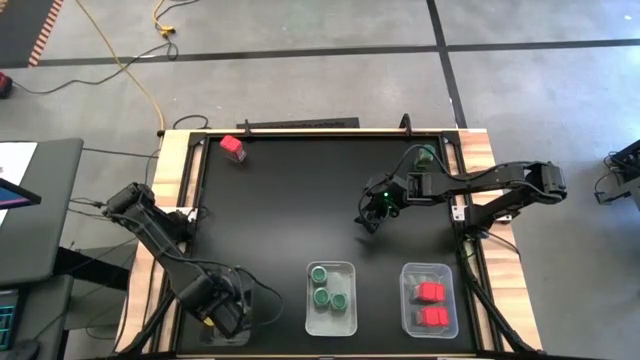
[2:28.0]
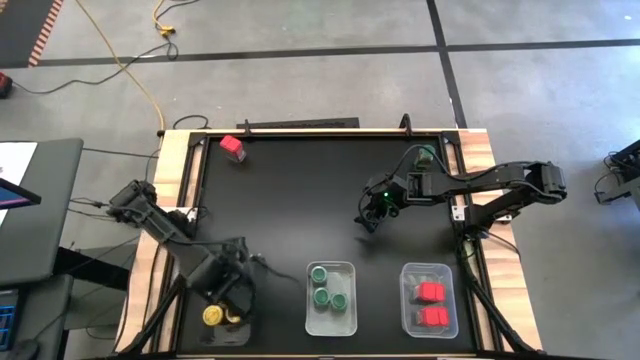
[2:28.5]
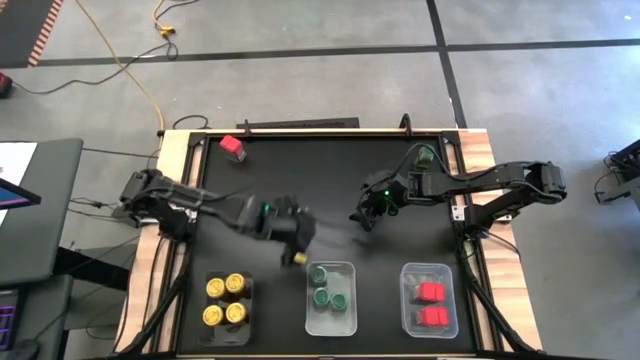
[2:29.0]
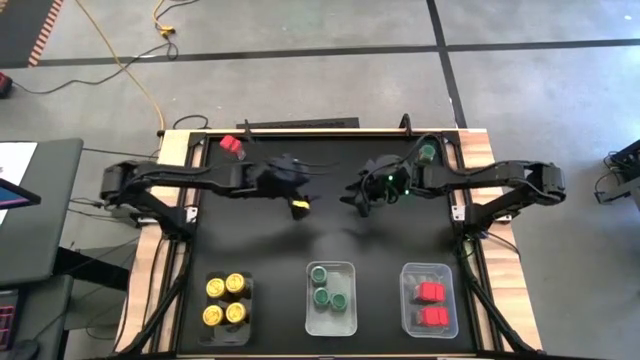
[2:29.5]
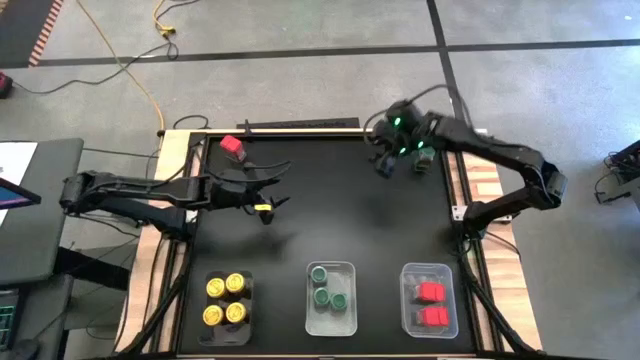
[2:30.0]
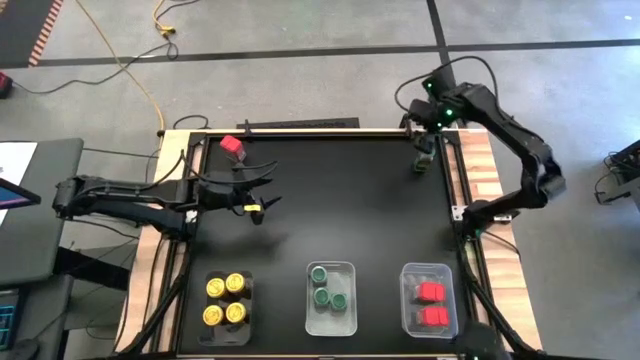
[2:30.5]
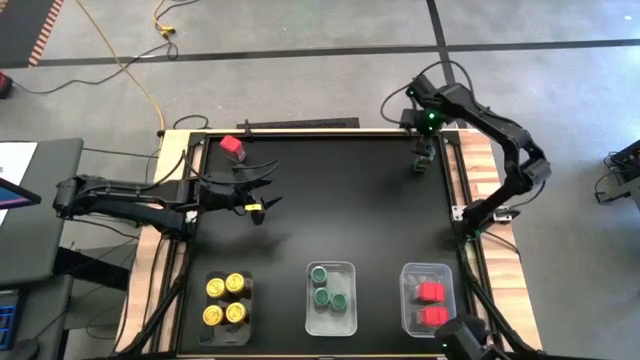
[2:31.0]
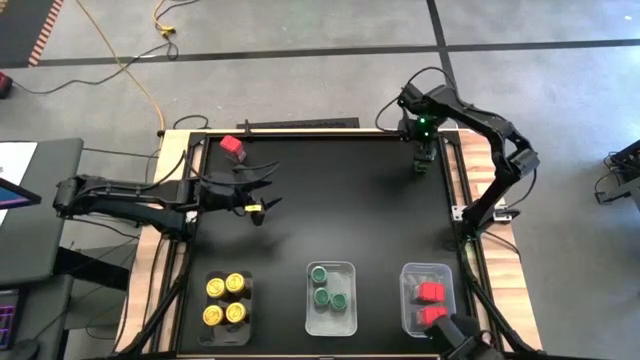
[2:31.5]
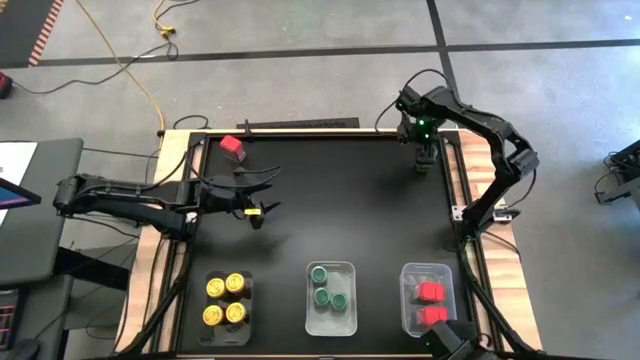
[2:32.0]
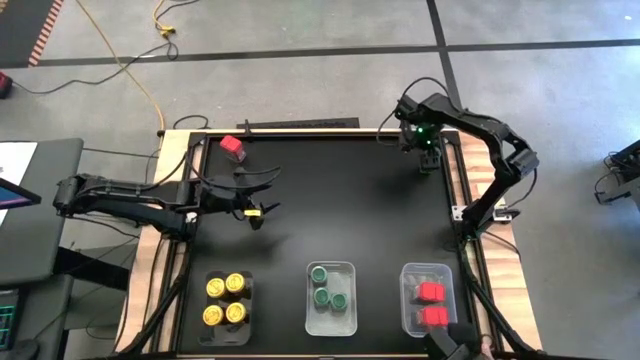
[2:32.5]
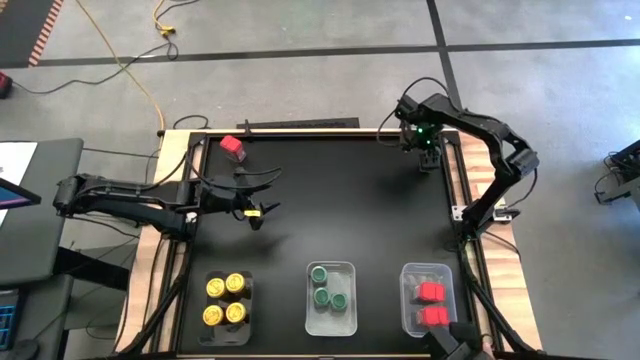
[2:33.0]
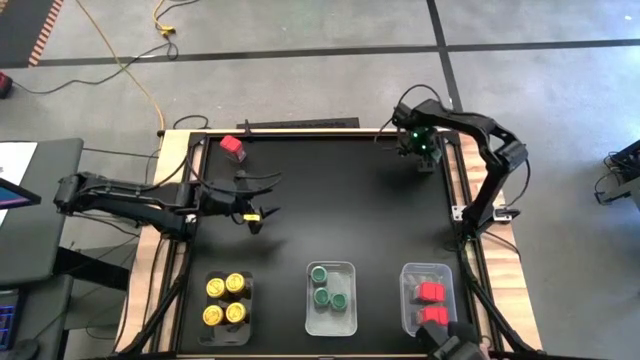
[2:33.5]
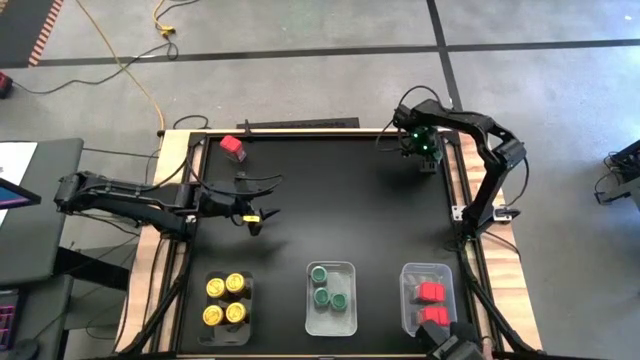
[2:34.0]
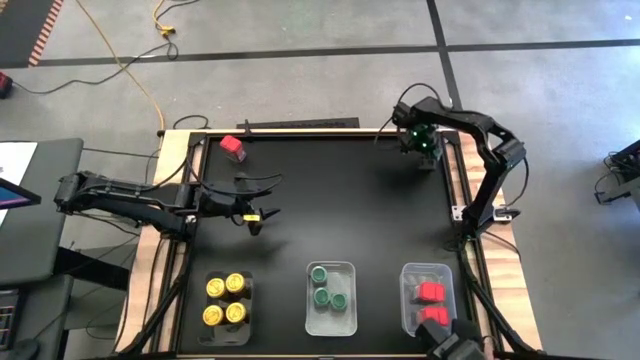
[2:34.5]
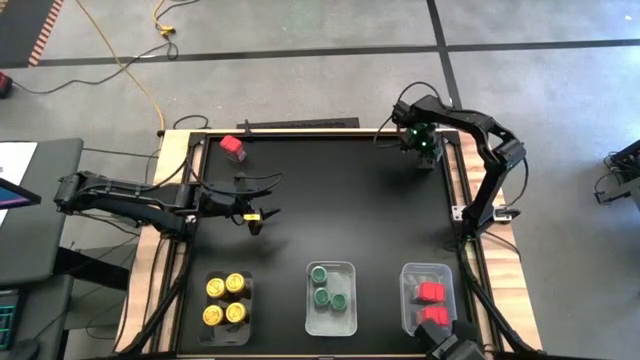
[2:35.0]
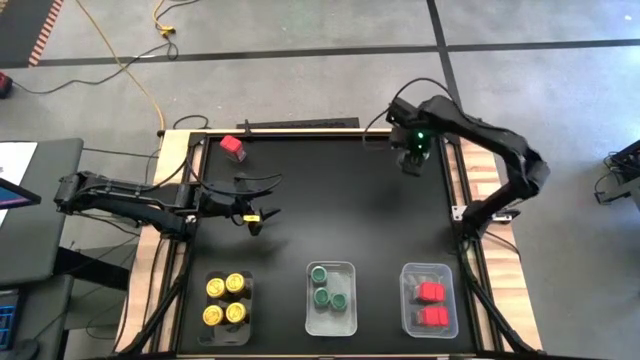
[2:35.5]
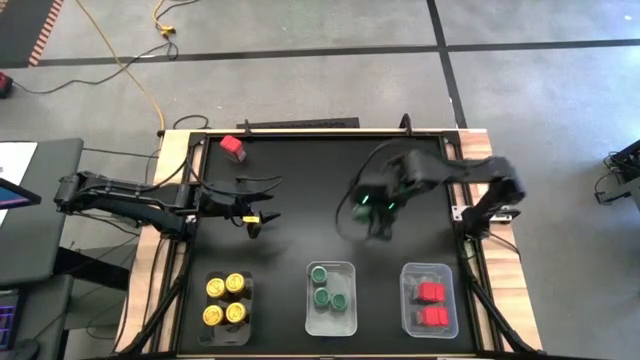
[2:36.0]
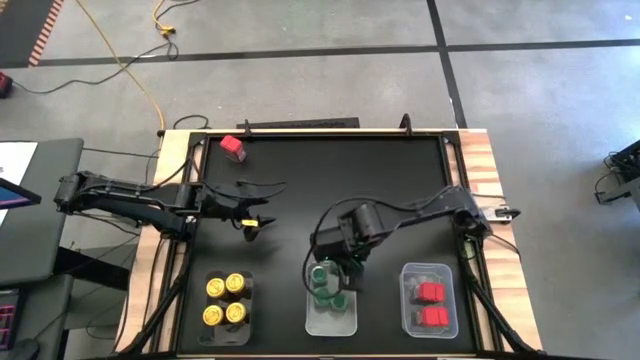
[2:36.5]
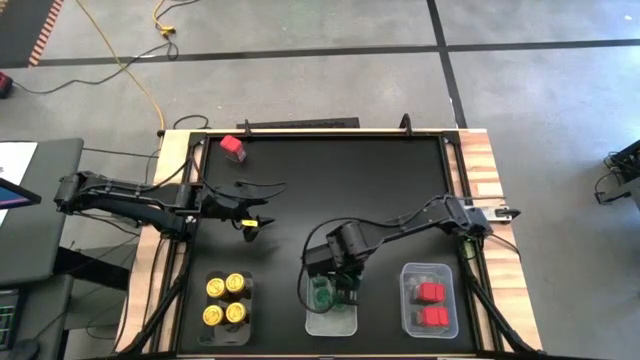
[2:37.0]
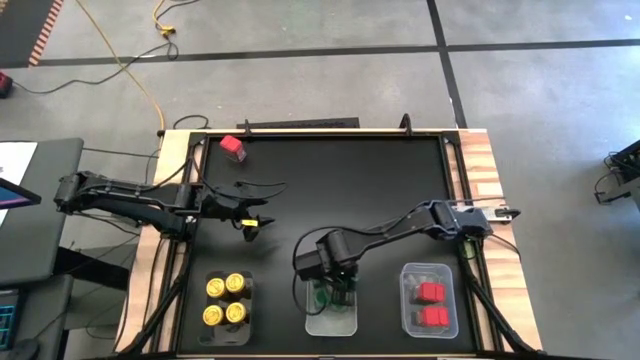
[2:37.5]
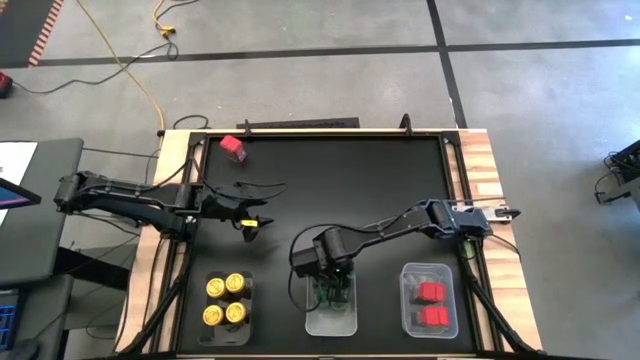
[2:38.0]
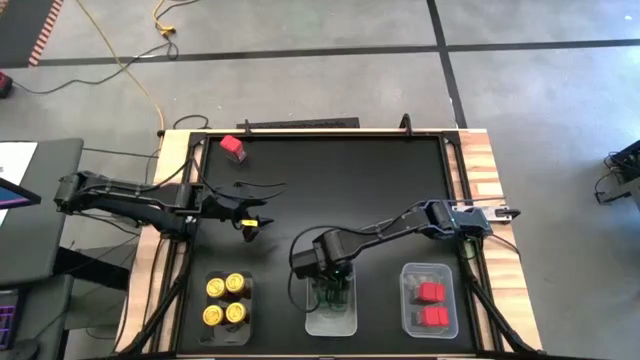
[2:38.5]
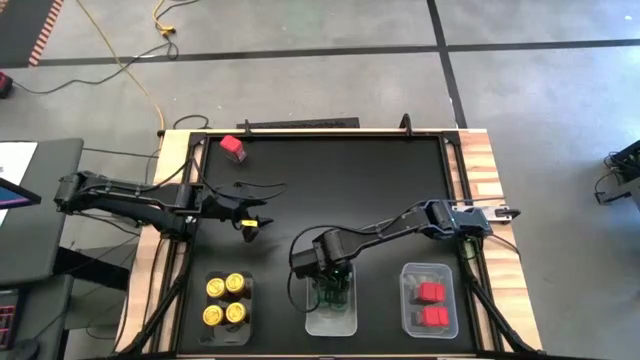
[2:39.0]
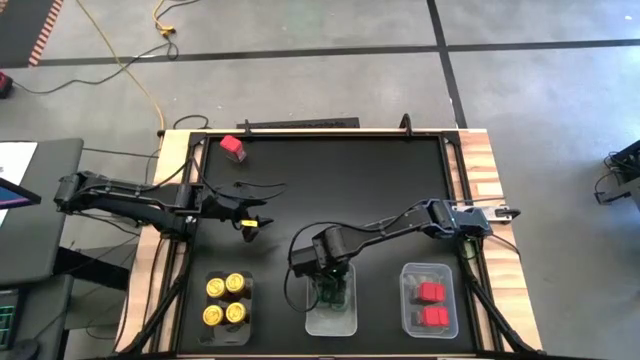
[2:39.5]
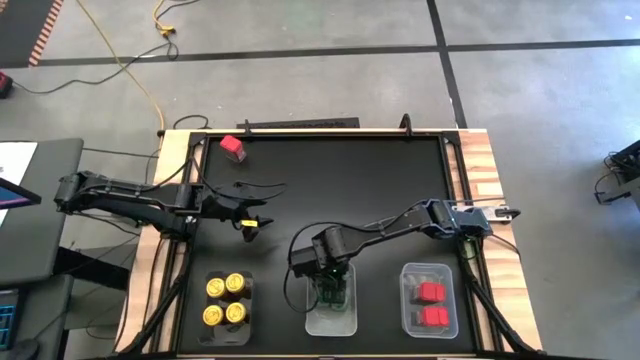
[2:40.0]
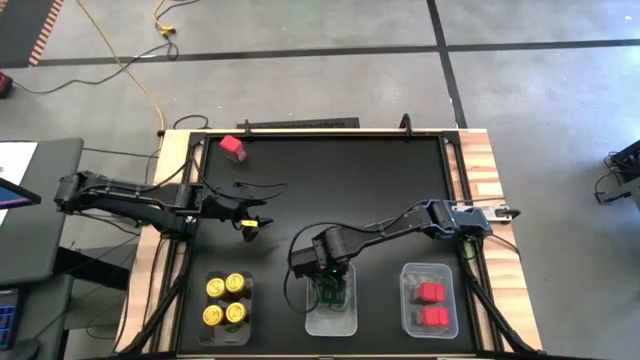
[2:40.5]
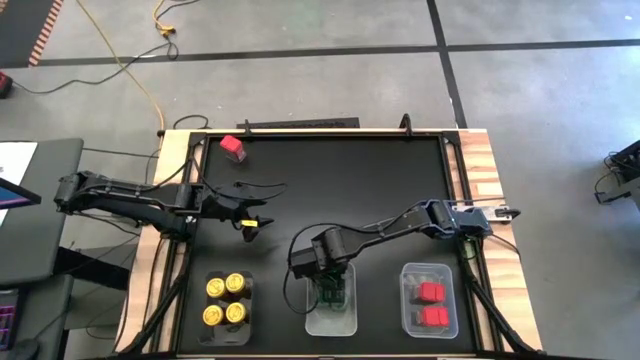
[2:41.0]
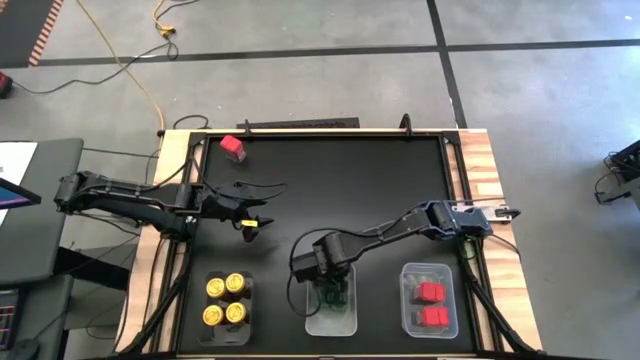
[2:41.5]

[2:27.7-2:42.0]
Task: Sort spices by type
Put the green seasoning bottle into the white bin

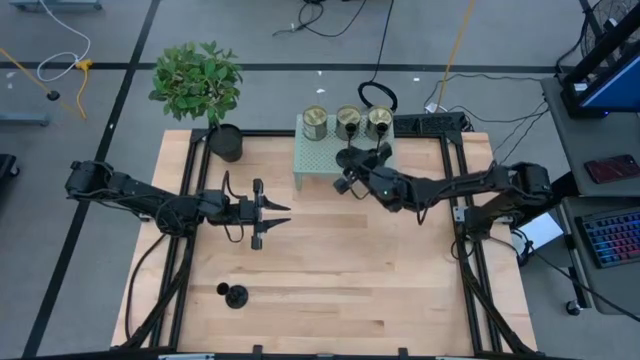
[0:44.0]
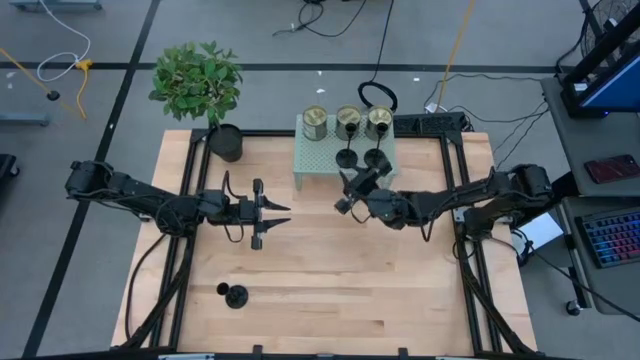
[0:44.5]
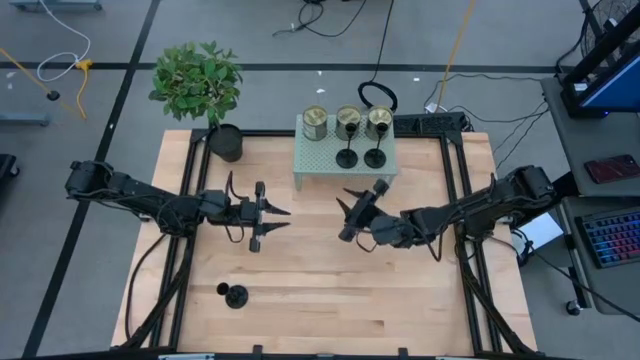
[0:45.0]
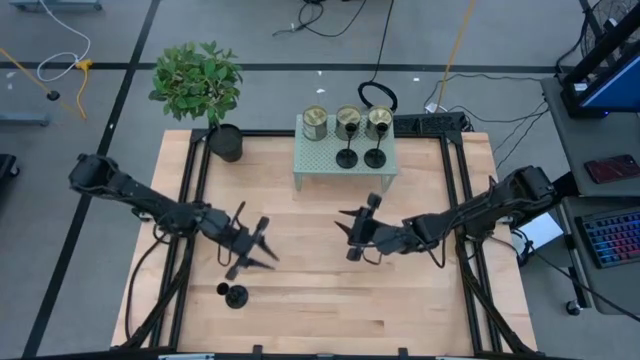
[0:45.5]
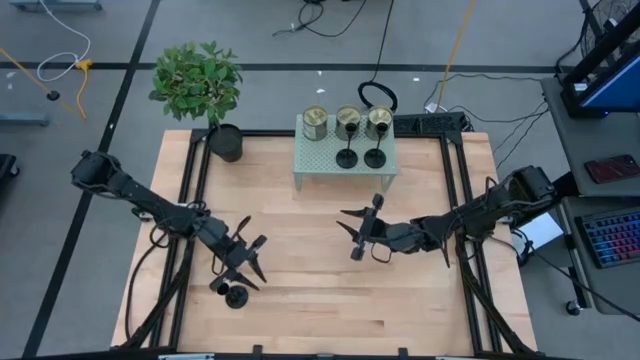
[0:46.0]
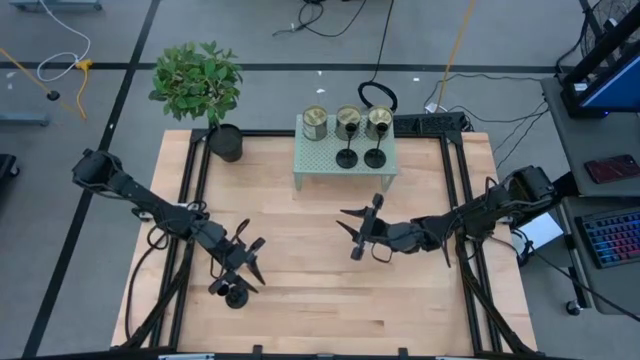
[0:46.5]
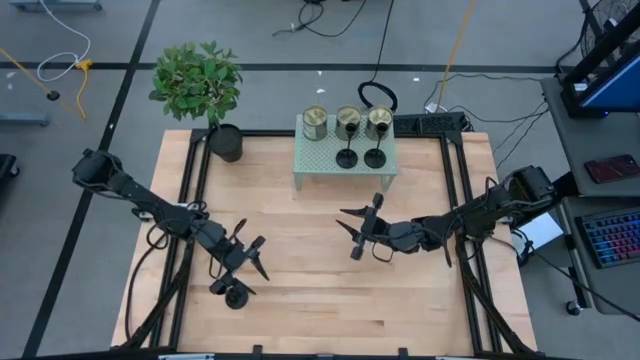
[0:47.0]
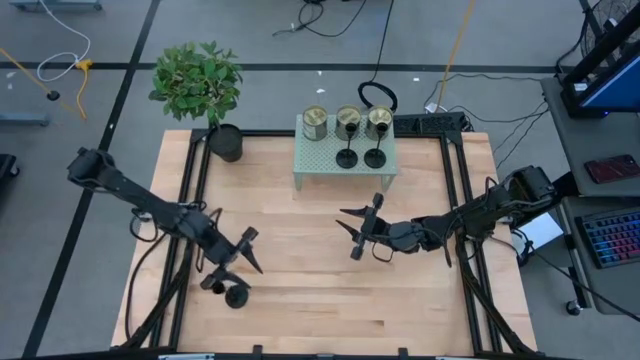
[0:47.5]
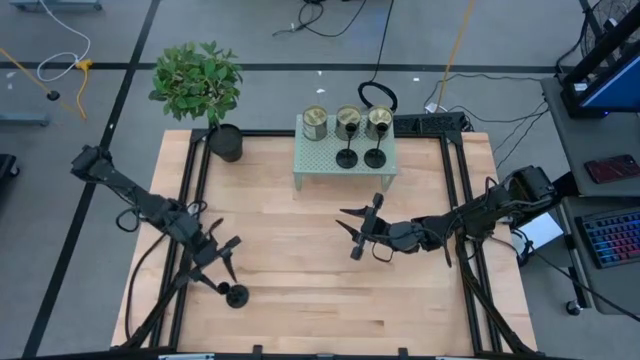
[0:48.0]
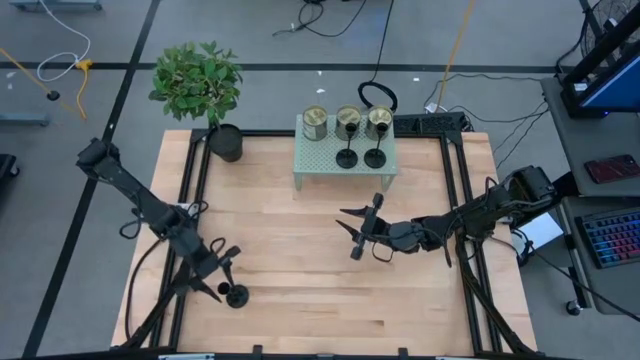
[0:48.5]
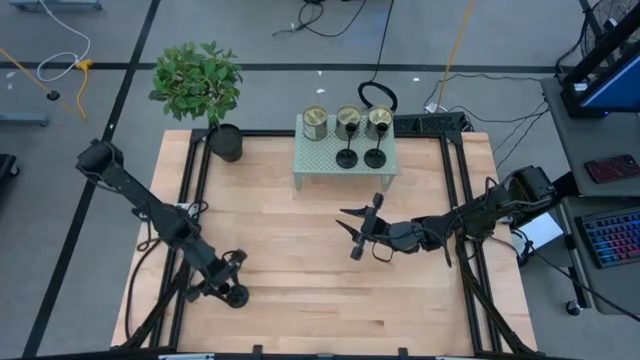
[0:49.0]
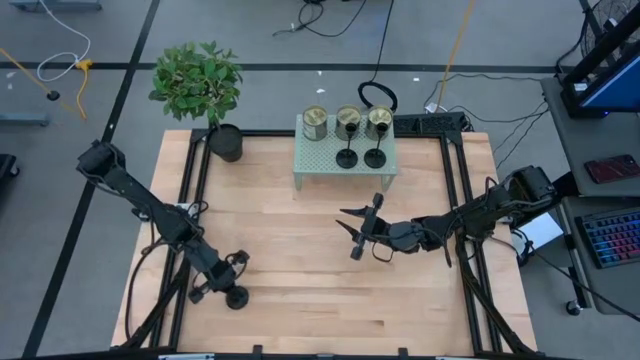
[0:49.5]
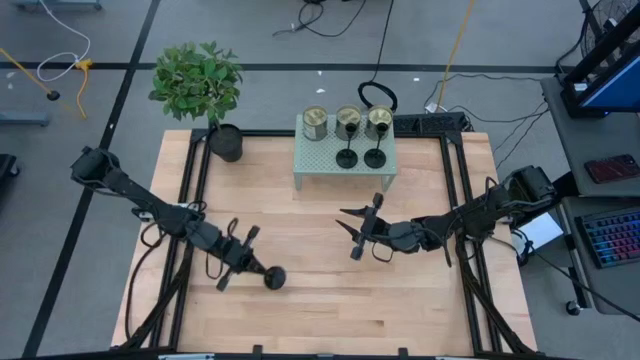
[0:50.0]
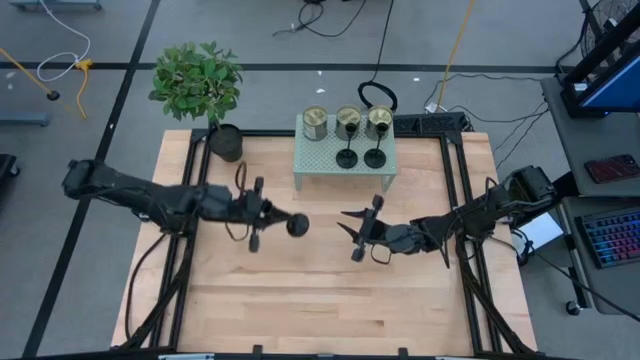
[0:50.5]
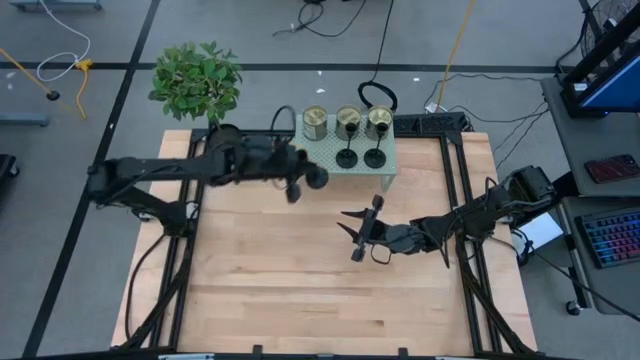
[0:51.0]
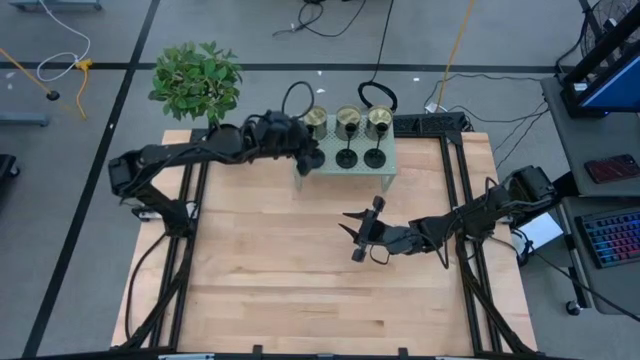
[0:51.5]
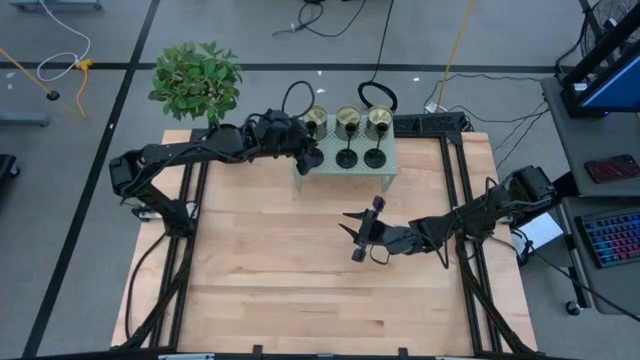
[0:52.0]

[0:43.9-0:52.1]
Task: Pick & Place candle stick holders
Put the black candle holder on the shelf aligned with the other black candle holder
